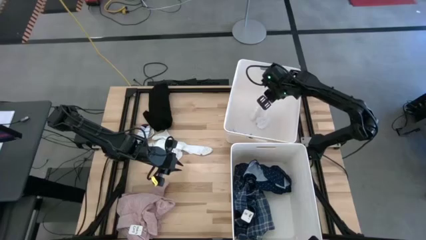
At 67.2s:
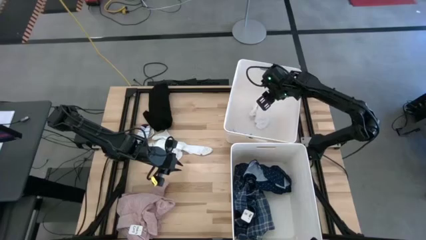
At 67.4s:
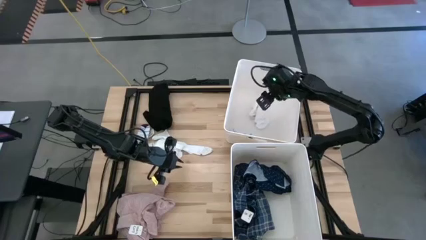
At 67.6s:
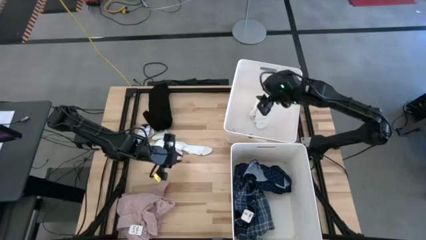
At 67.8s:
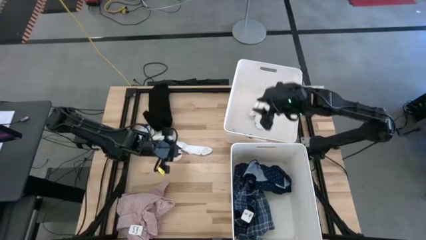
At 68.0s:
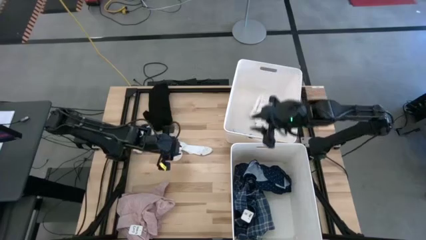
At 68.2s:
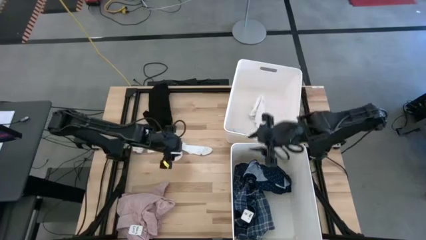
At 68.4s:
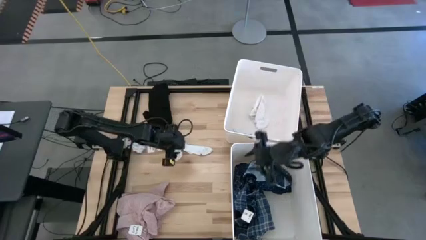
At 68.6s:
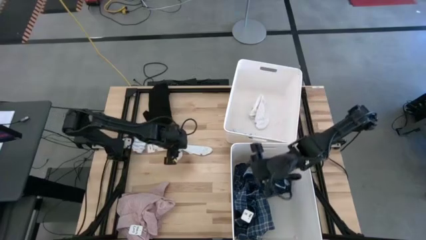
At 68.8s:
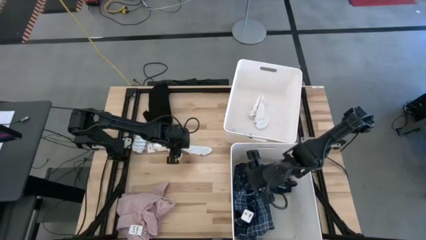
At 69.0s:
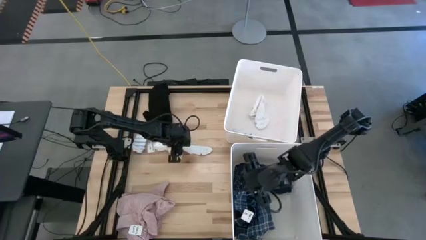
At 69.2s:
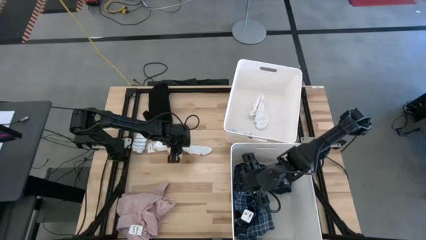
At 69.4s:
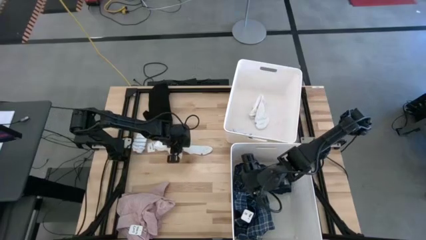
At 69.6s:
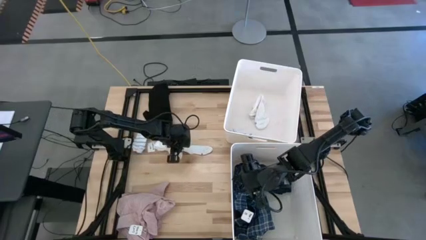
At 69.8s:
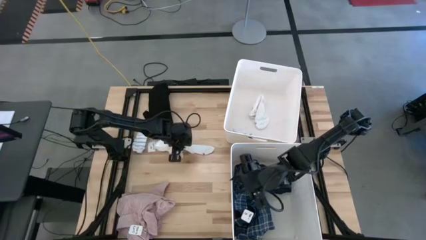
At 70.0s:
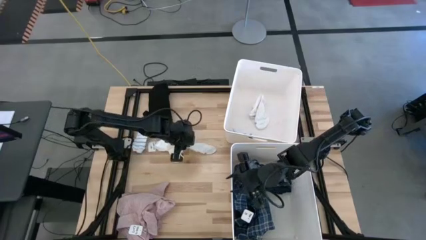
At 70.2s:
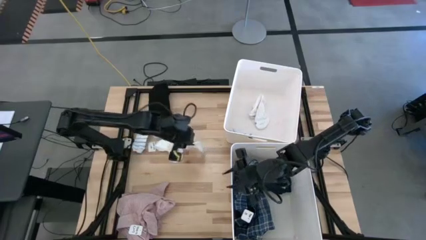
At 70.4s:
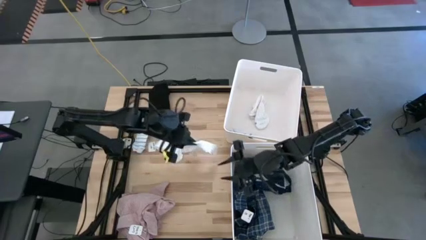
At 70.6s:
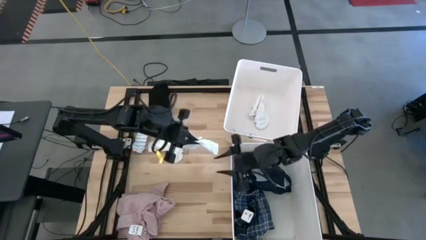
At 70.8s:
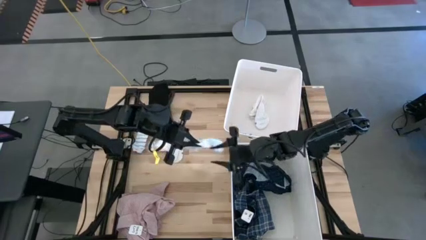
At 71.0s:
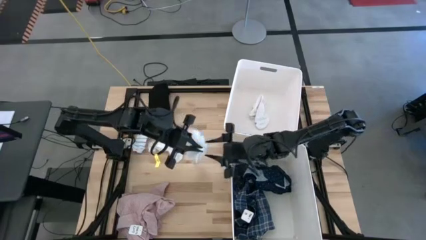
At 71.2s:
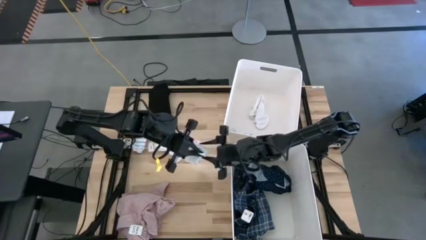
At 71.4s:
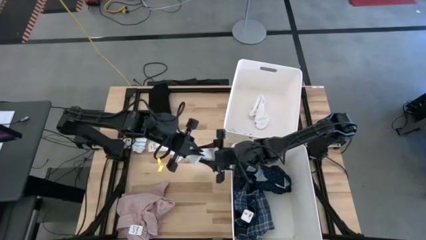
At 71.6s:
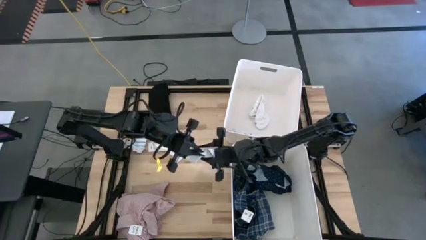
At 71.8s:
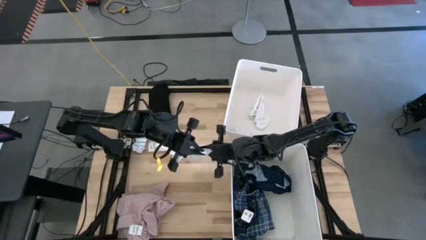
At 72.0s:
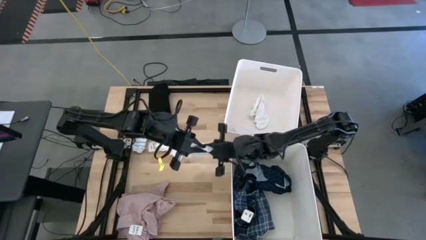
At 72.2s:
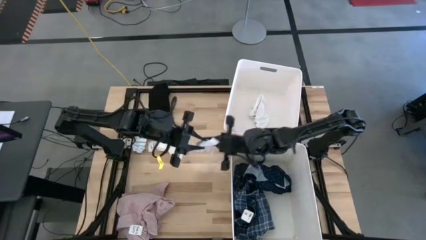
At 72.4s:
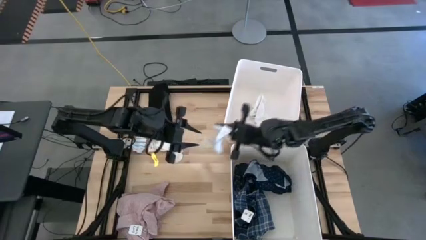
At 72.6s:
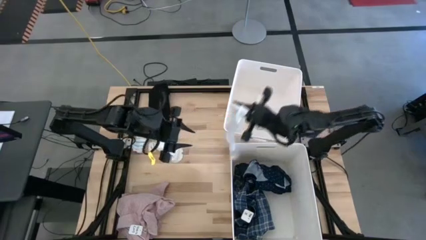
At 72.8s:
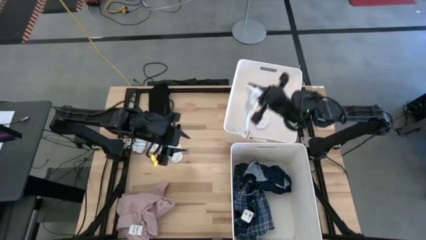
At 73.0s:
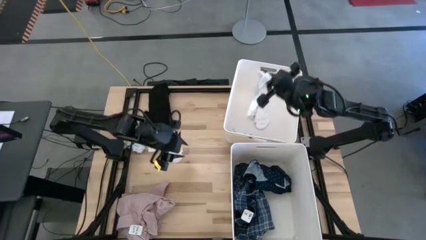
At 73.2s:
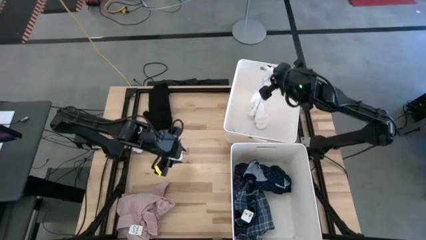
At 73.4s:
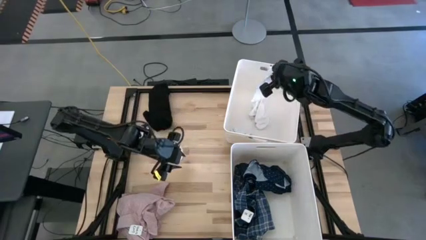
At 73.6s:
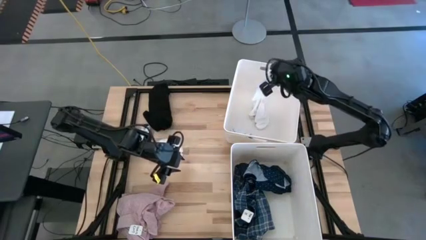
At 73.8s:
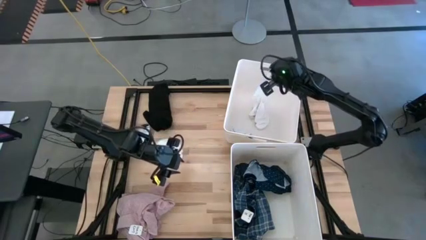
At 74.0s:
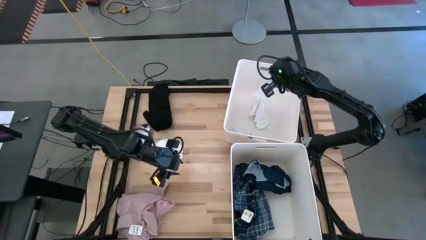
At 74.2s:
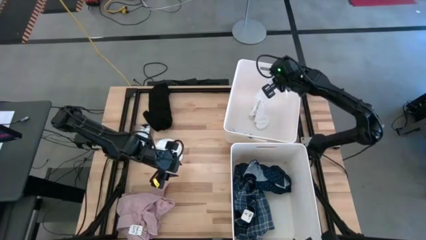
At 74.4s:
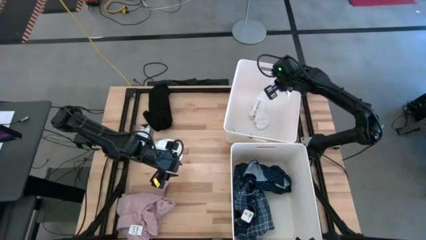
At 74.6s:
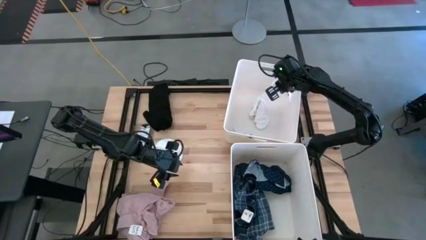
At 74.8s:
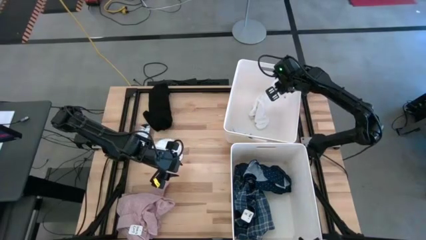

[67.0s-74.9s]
Task: Sort clothes
Put the white sock into the top white laundry bin

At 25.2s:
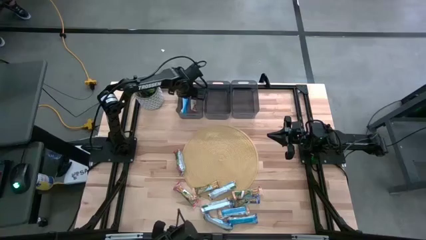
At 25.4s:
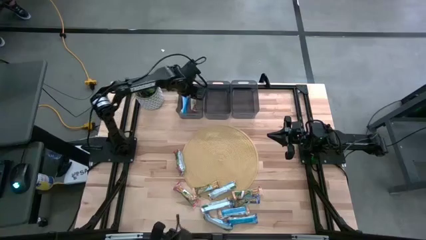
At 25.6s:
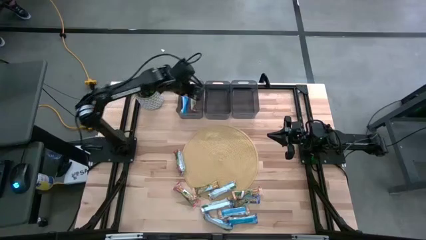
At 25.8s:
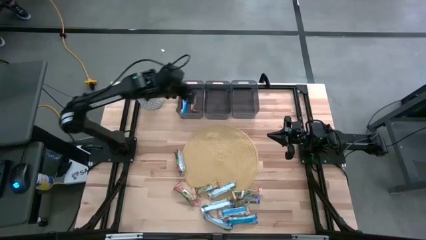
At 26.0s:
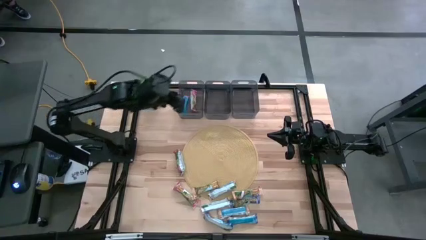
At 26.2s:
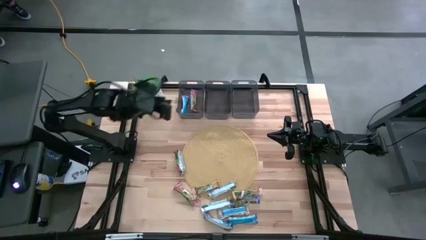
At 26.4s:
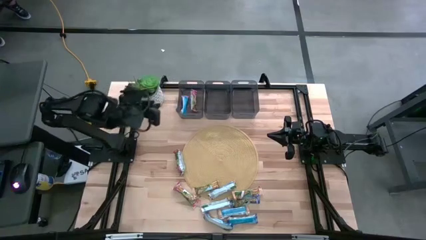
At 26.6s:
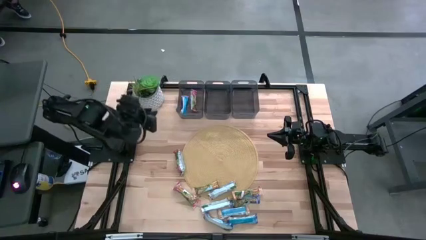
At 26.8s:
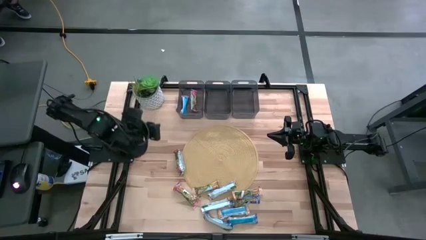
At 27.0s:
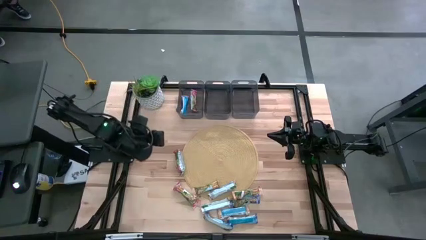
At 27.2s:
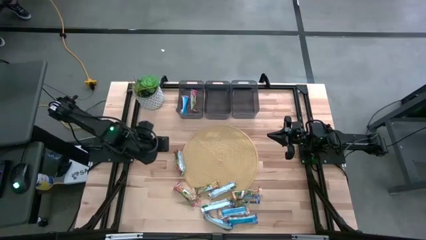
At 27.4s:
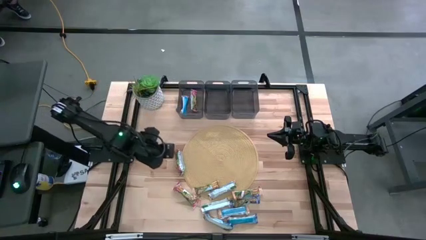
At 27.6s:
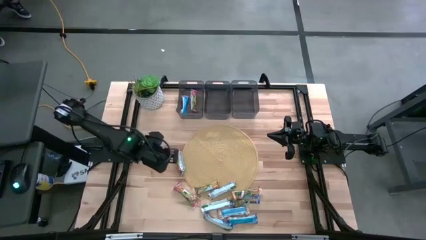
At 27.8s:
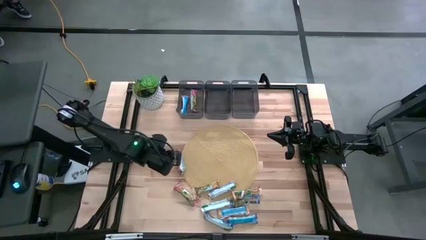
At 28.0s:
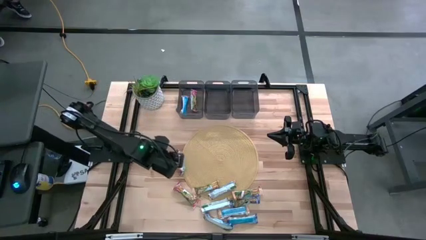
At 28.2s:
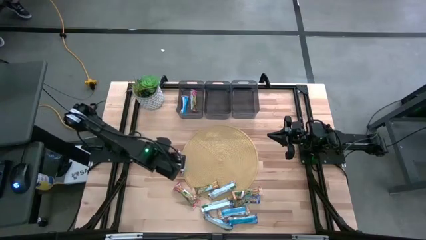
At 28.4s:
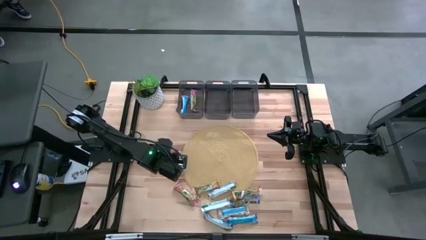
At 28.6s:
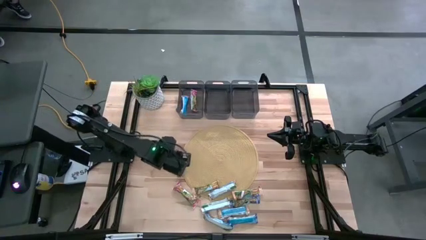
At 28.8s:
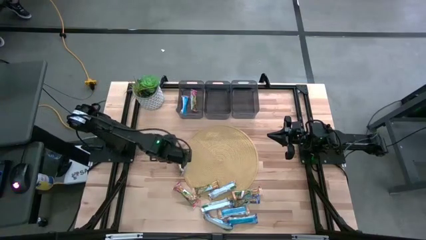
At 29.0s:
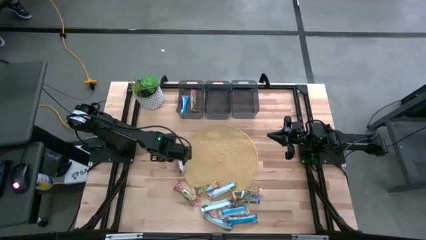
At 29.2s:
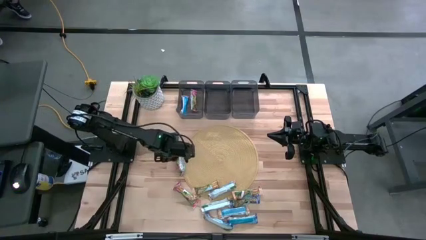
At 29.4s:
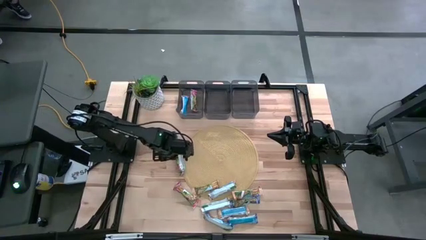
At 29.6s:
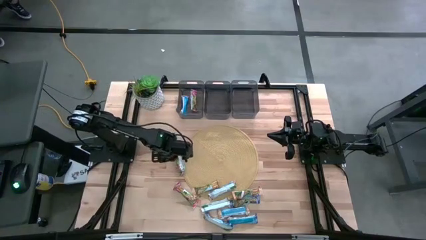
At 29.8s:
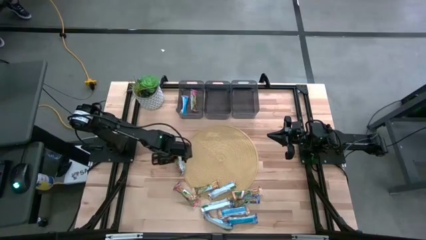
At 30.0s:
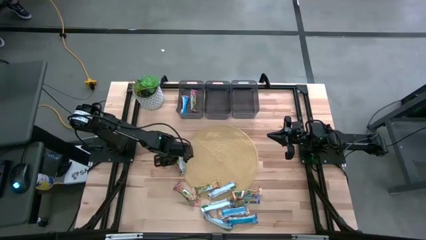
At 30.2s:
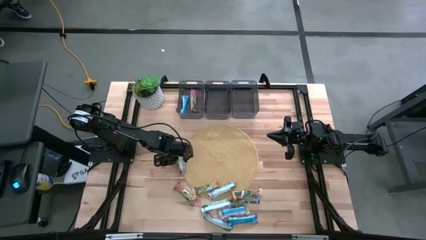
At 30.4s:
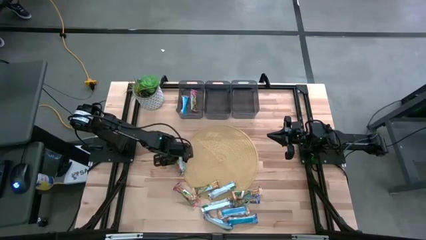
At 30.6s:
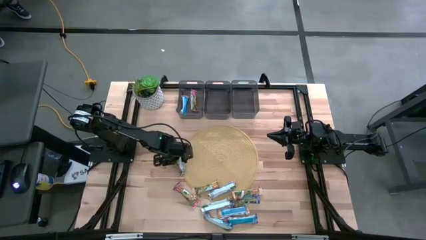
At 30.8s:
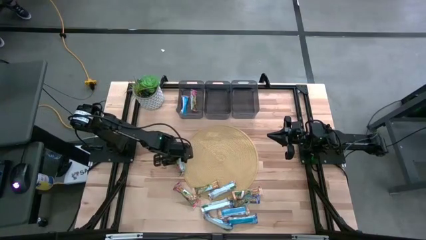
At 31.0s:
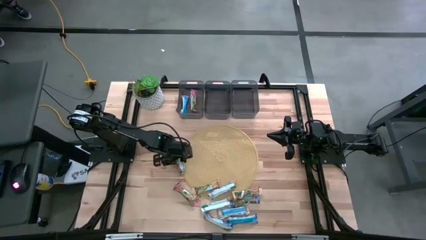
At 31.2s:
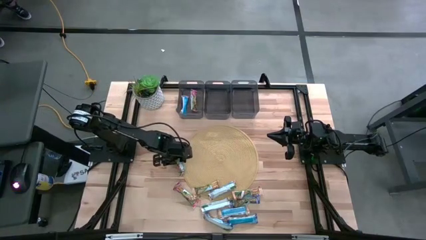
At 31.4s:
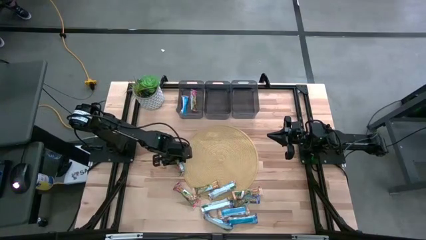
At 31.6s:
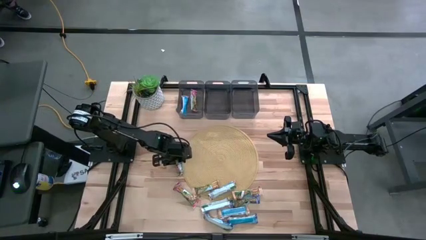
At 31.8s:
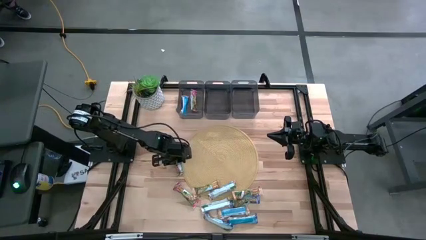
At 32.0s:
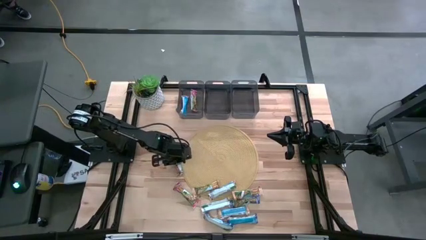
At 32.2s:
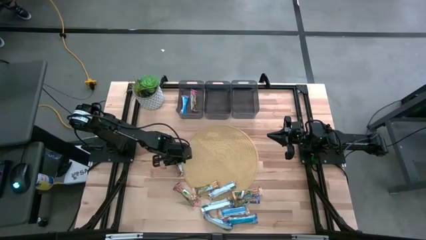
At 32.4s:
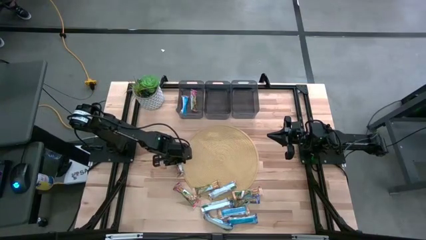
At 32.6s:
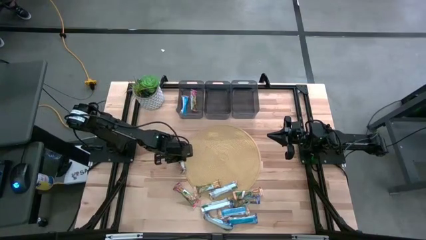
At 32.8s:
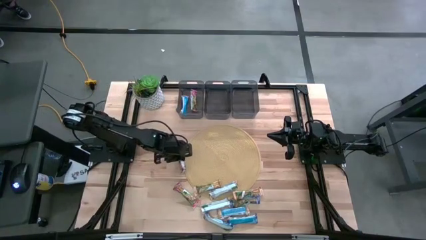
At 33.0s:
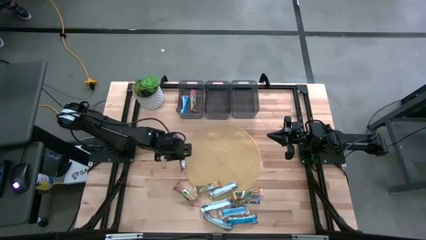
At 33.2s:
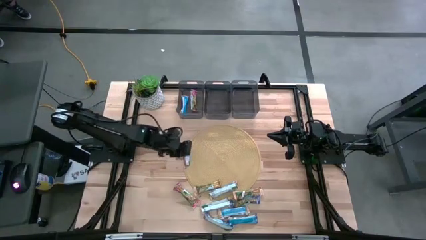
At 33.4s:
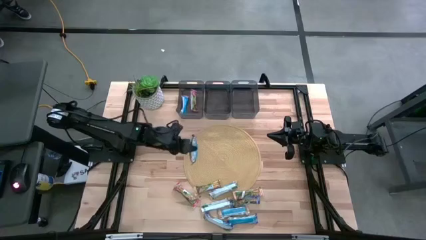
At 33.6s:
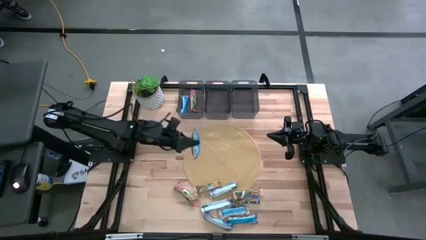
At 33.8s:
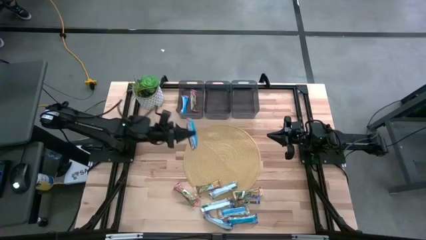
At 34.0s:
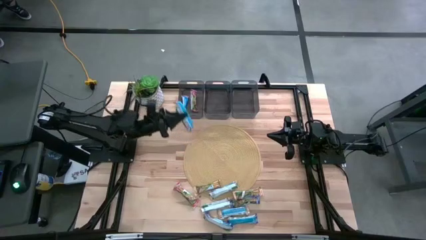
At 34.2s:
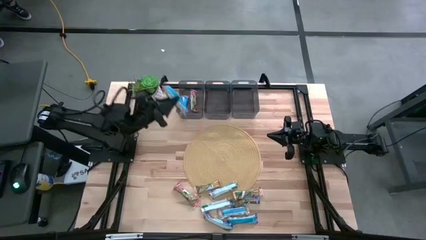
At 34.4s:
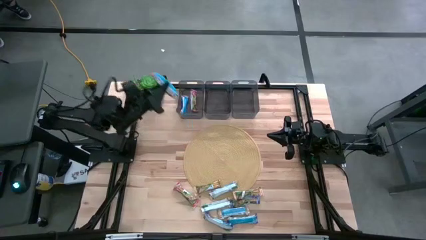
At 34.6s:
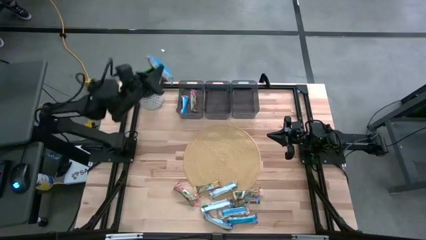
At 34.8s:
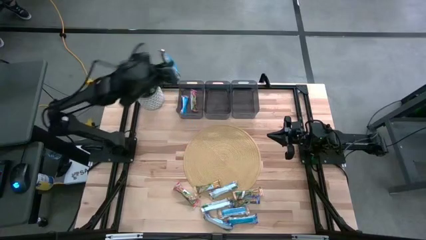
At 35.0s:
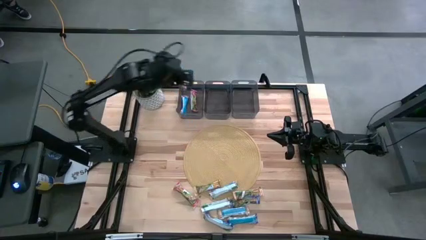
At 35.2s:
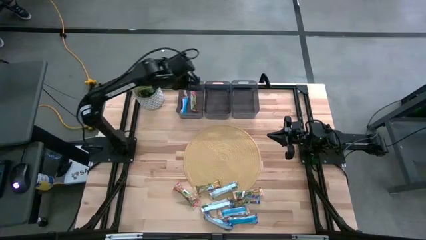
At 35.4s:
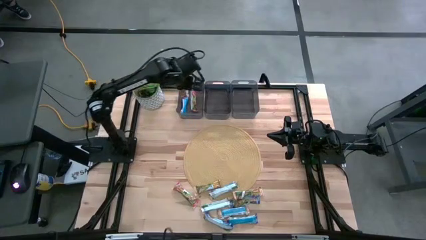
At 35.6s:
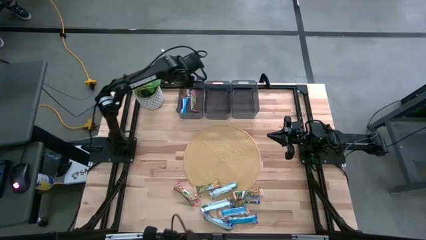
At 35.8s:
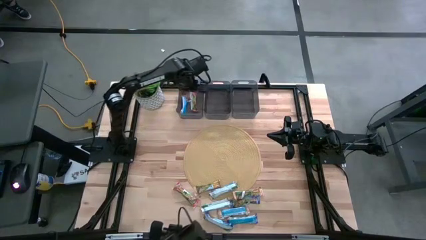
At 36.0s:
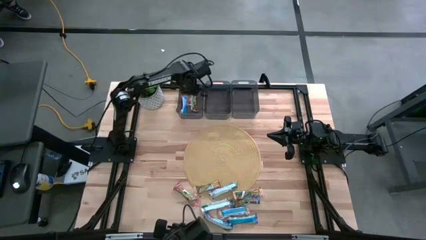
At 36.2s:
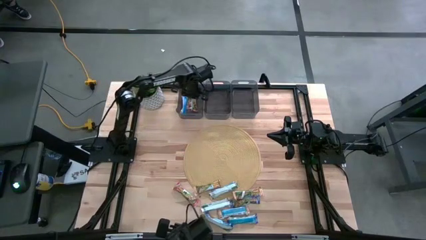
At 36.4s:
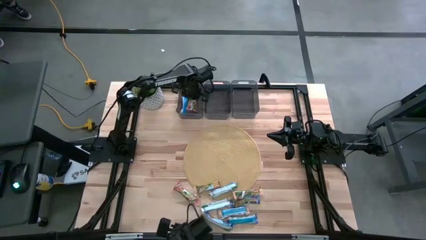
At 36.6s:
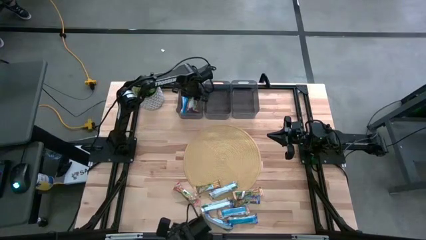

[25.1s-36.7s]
Task: Pick and place Granola Bars by type
Put the red granola bar into the left black bin
